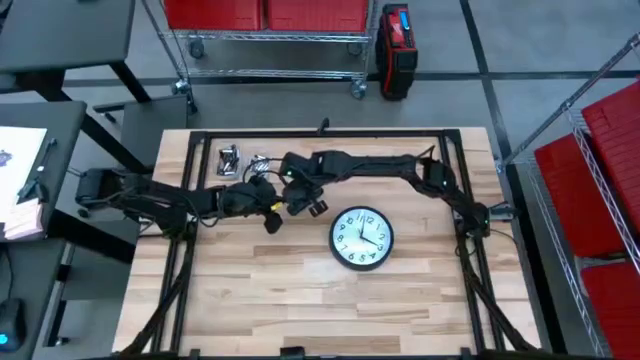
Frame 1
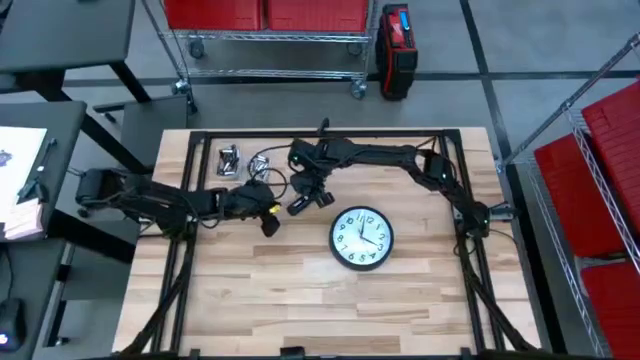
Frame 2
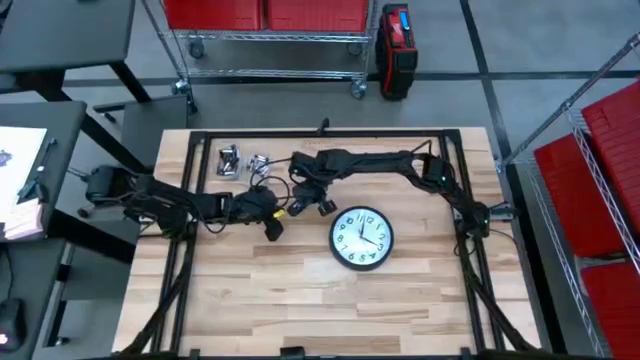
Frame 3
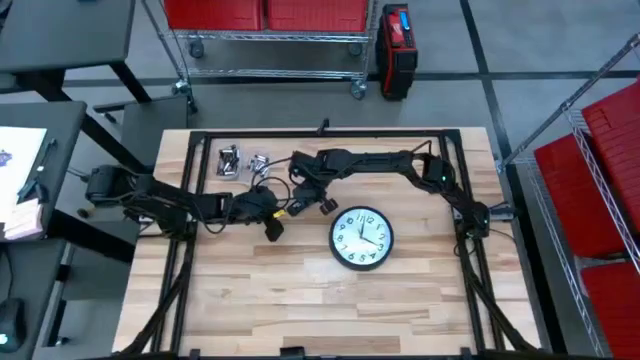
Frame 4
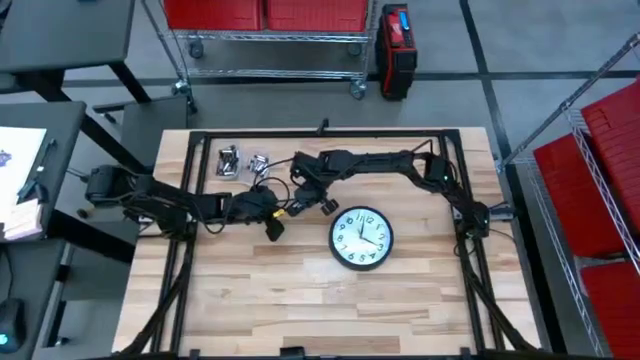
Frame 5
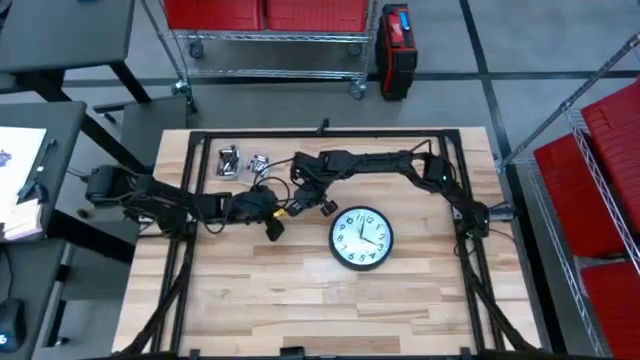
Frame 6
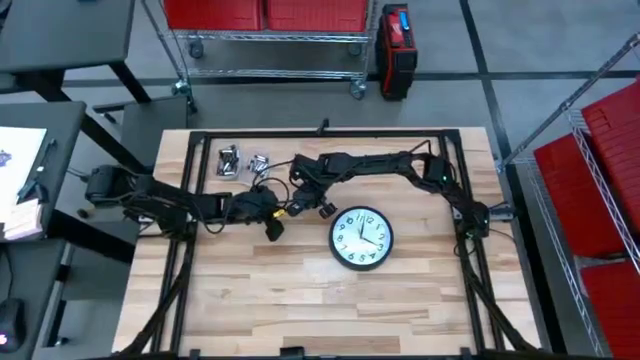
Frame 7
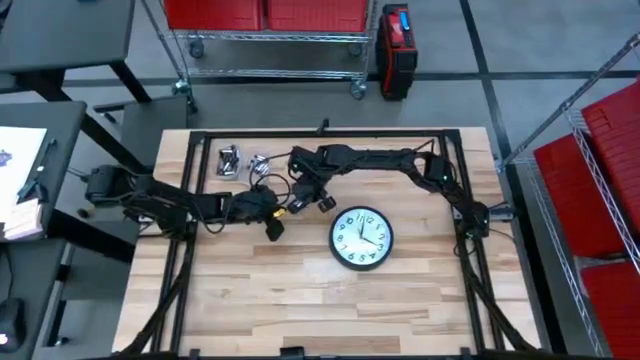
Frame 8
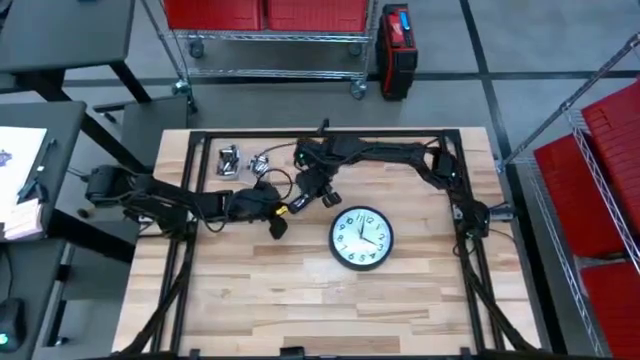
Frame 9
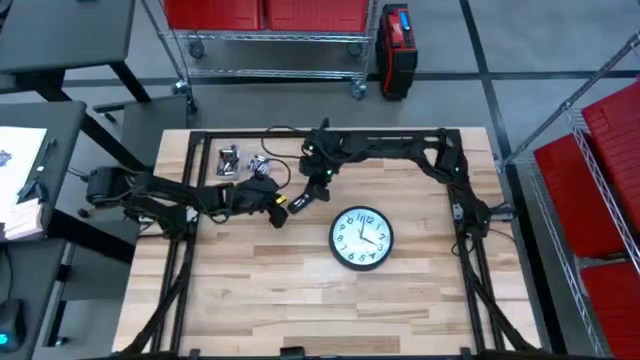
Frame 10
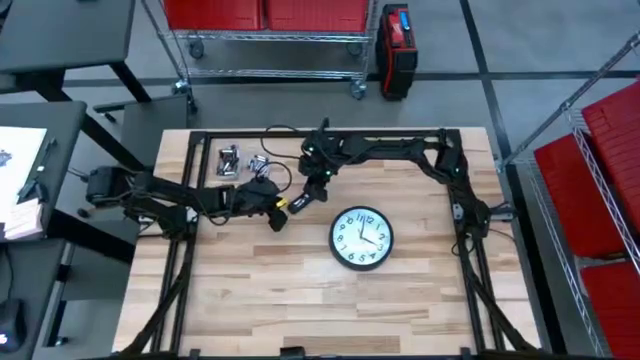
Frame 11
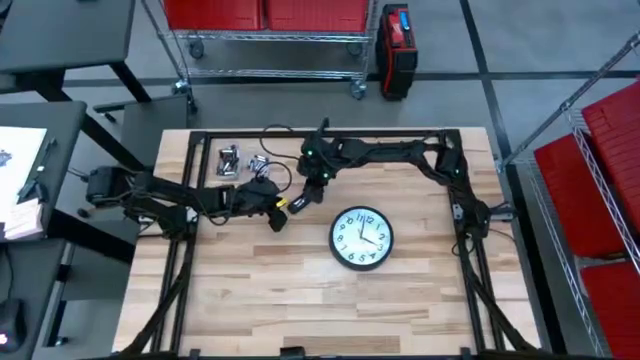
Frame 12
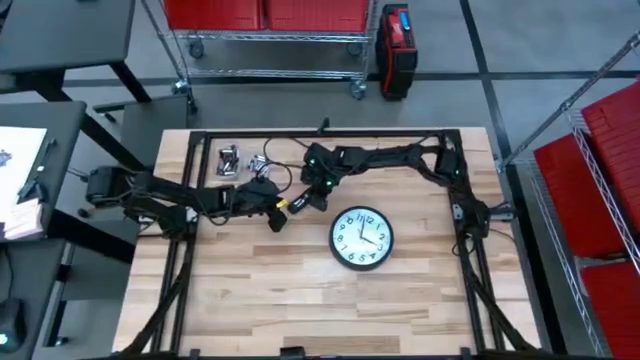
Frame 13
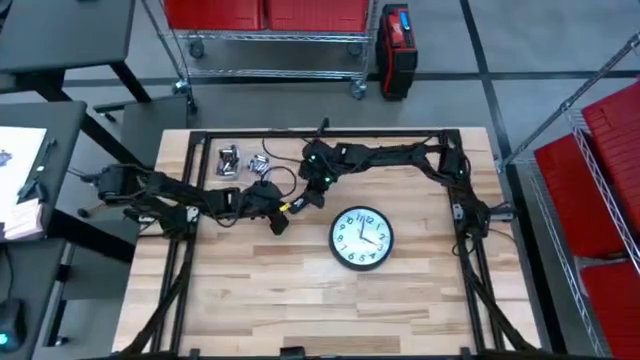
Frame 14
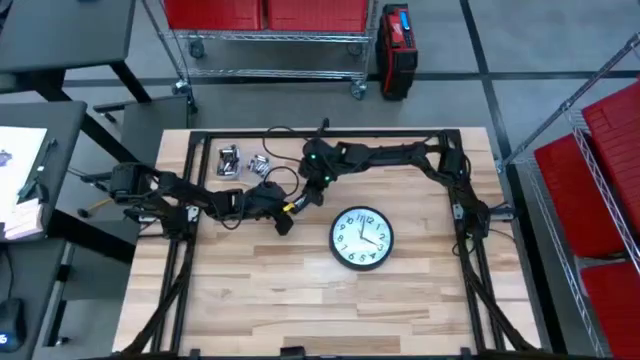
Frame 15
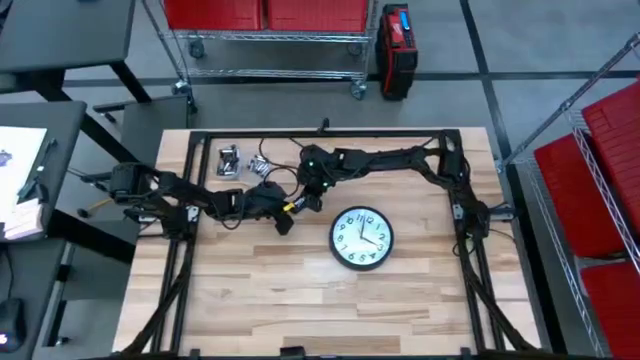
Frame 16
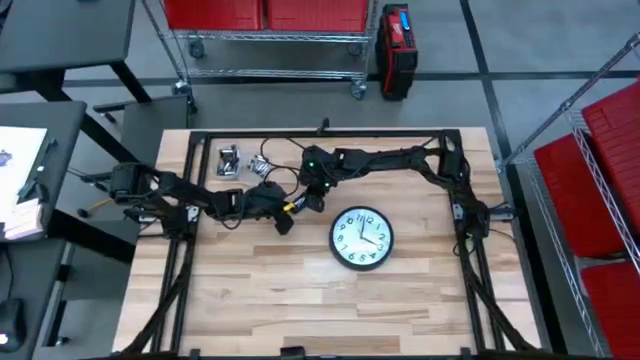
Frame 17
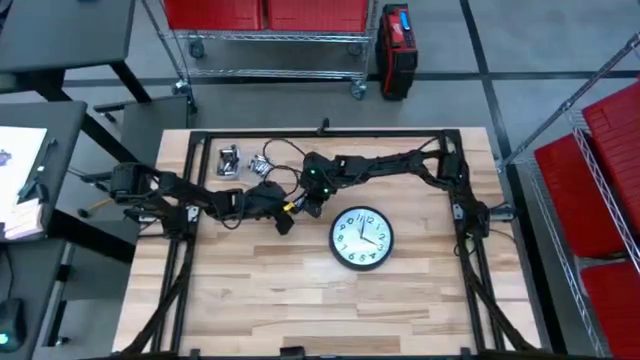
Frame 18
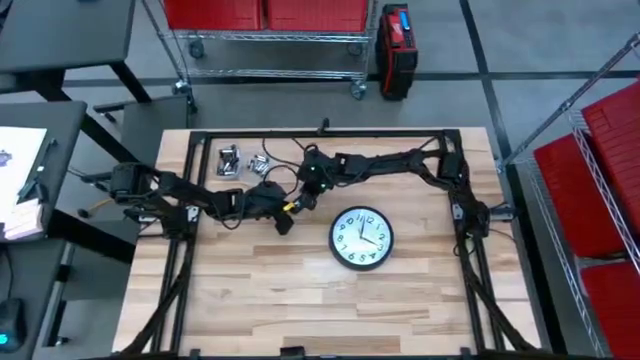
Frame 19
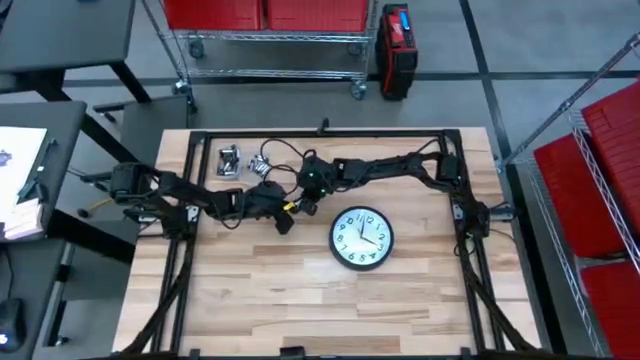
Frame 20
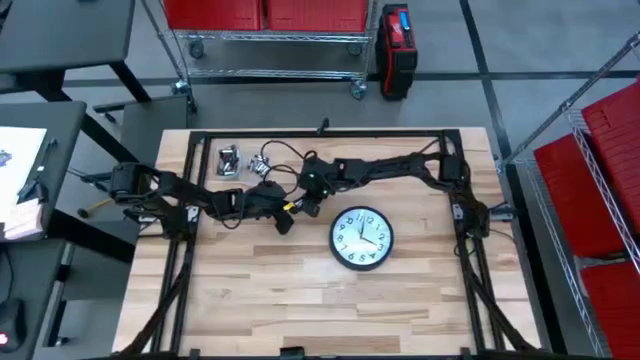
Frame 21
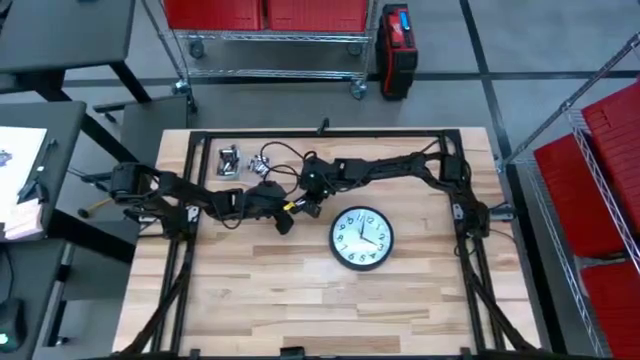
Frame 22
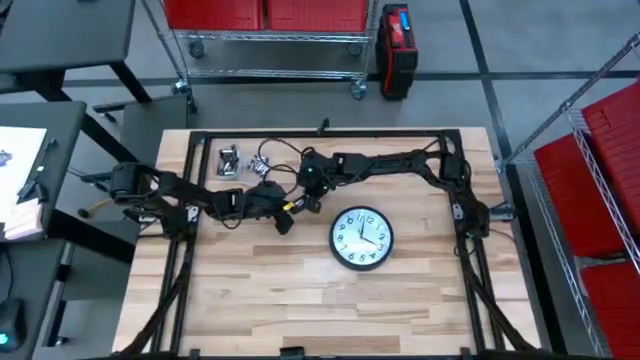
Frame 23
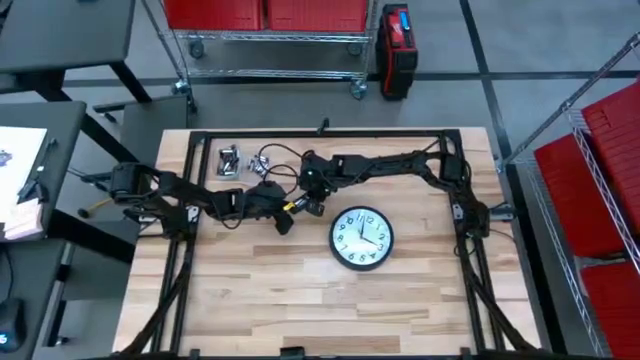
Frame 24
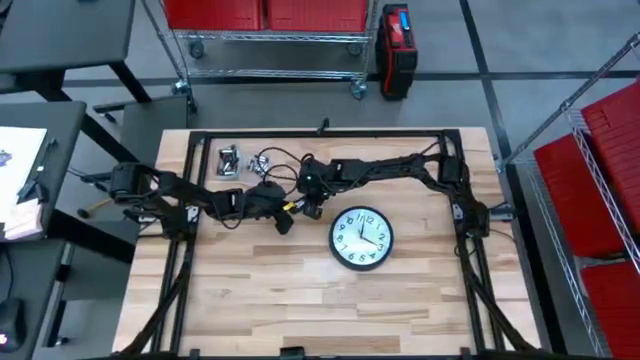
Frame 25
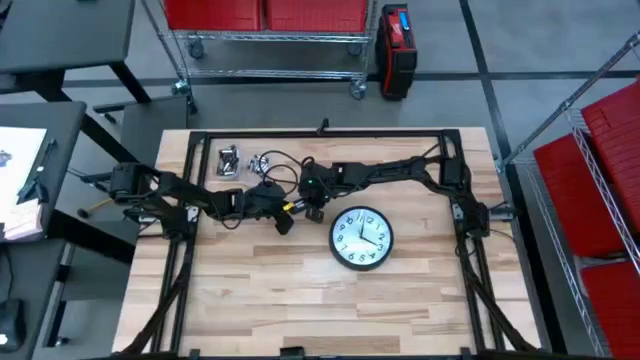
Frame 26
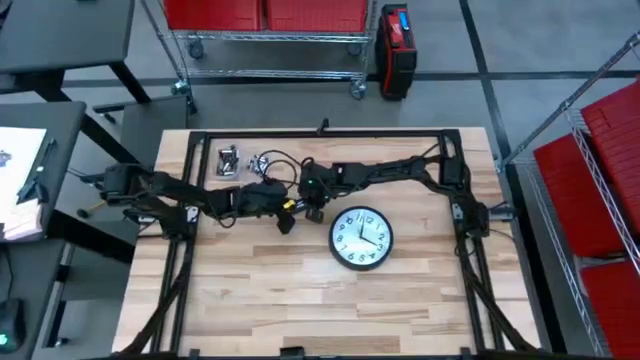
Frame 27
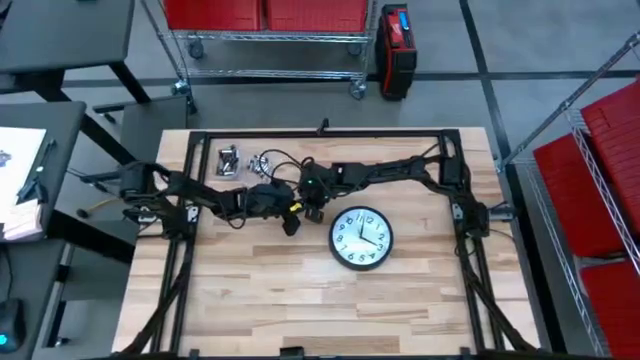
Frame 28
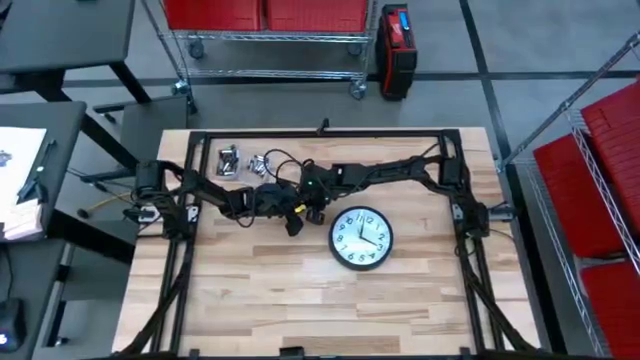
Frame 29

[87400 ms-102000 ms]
Task: Insert battery
Insert the silver battery into the remote
